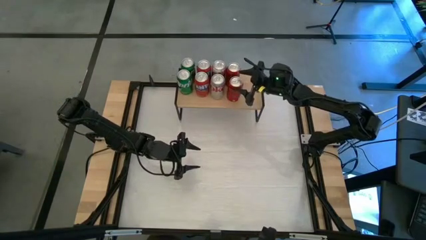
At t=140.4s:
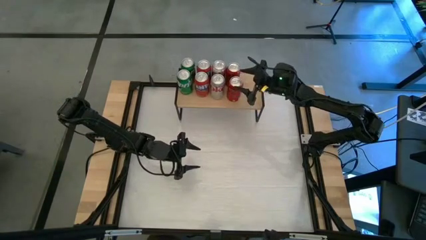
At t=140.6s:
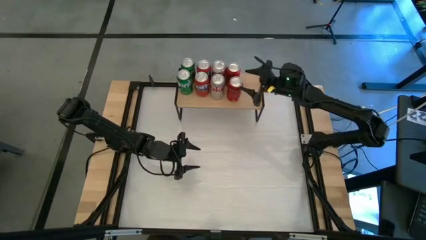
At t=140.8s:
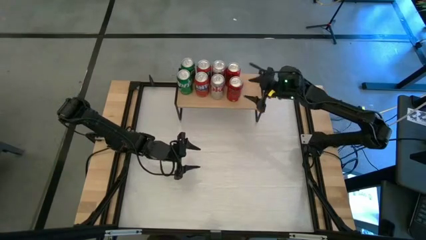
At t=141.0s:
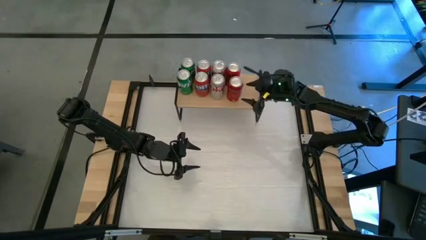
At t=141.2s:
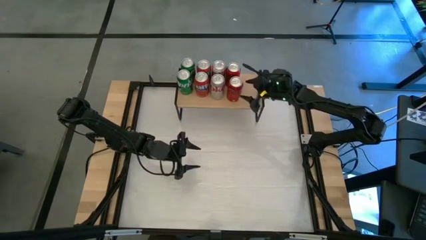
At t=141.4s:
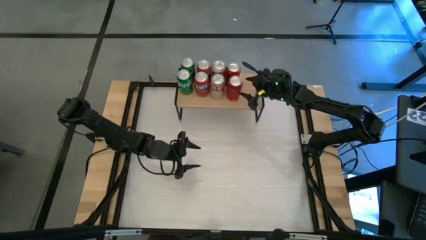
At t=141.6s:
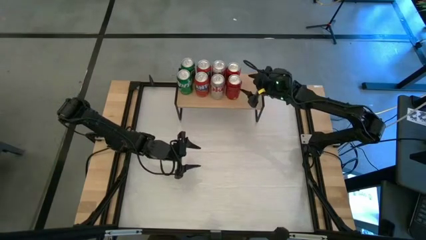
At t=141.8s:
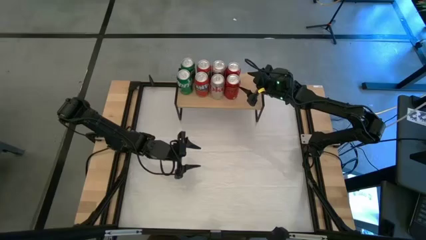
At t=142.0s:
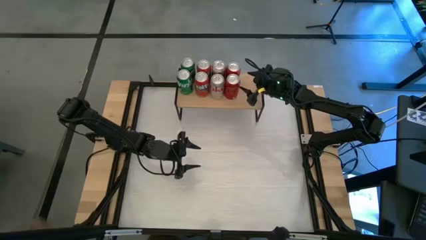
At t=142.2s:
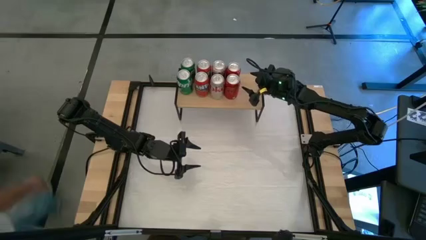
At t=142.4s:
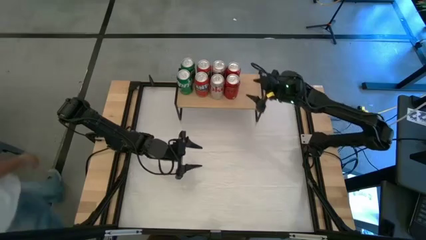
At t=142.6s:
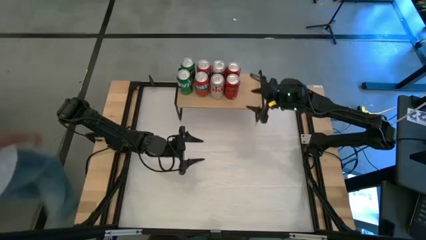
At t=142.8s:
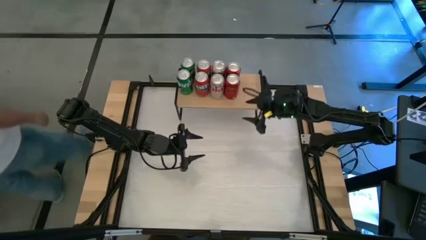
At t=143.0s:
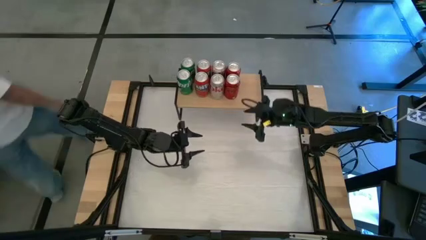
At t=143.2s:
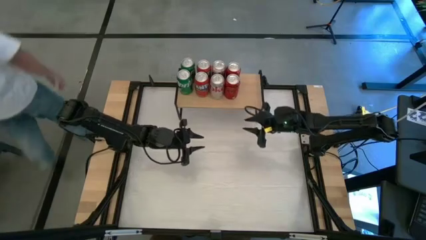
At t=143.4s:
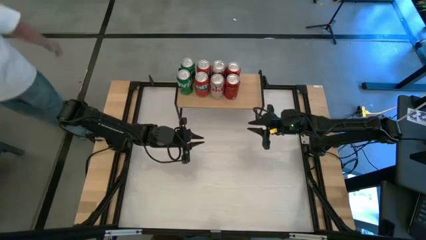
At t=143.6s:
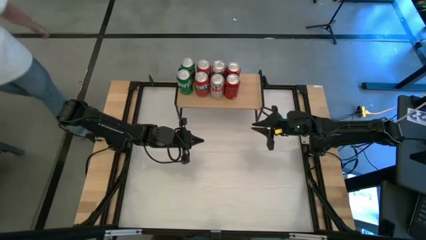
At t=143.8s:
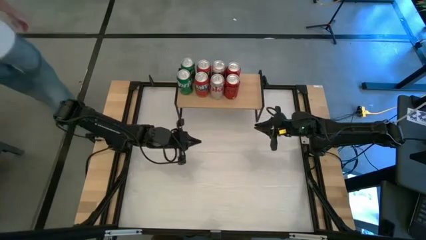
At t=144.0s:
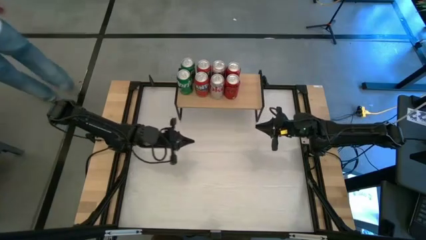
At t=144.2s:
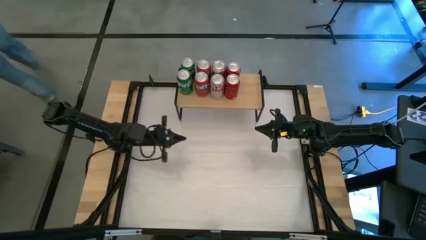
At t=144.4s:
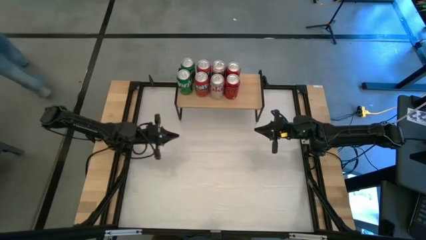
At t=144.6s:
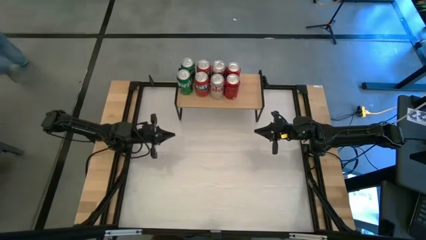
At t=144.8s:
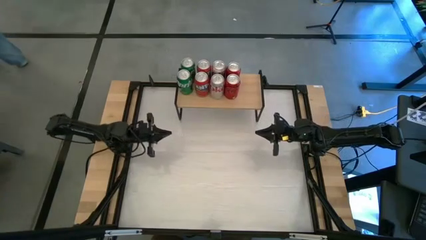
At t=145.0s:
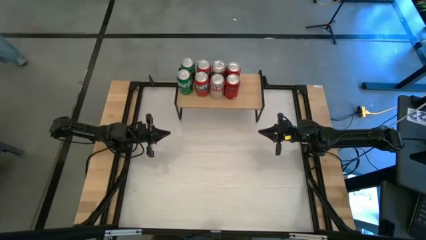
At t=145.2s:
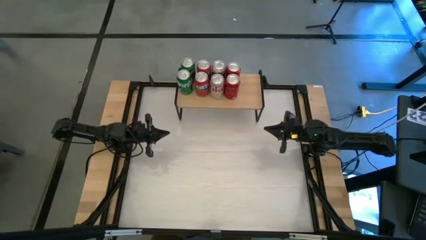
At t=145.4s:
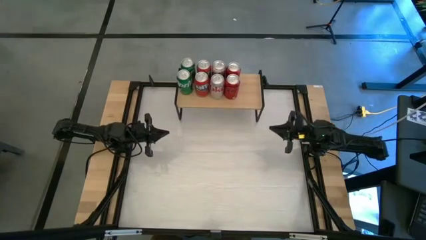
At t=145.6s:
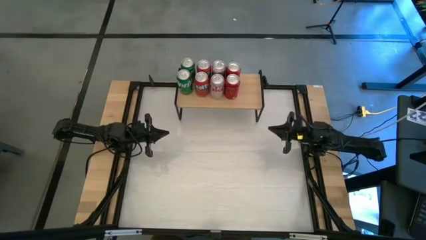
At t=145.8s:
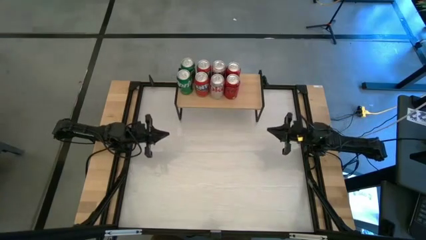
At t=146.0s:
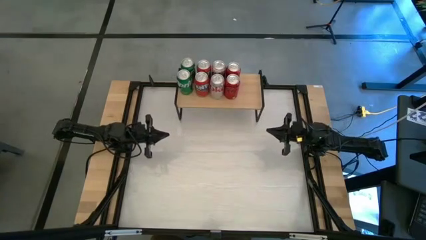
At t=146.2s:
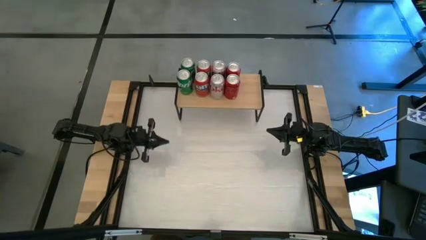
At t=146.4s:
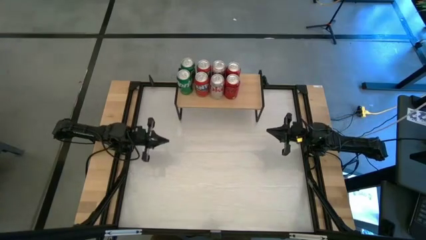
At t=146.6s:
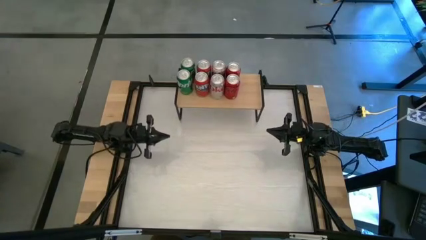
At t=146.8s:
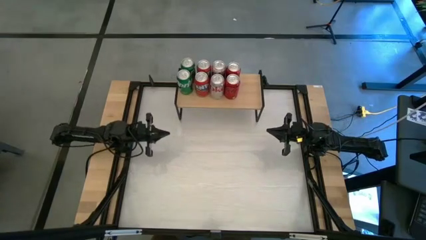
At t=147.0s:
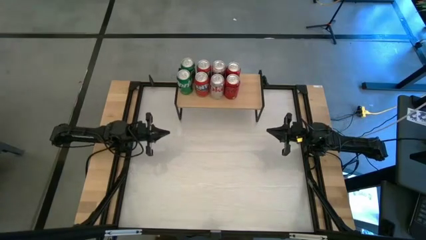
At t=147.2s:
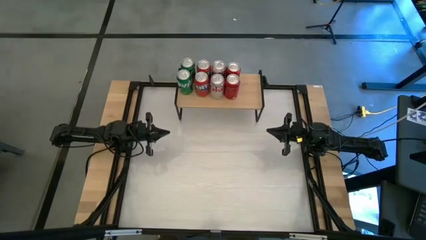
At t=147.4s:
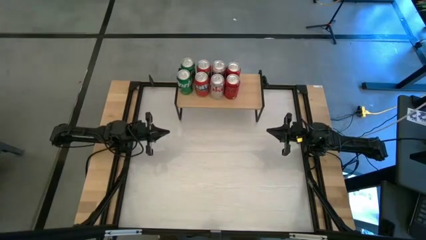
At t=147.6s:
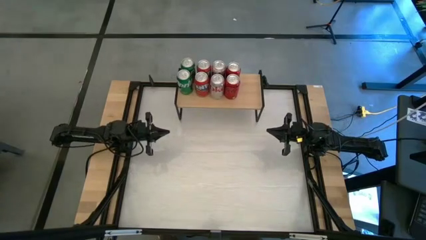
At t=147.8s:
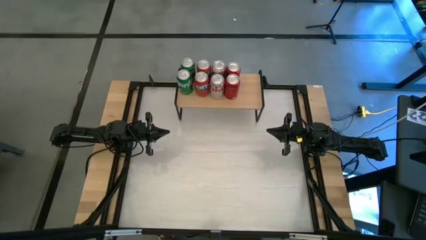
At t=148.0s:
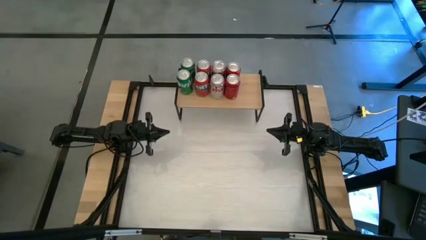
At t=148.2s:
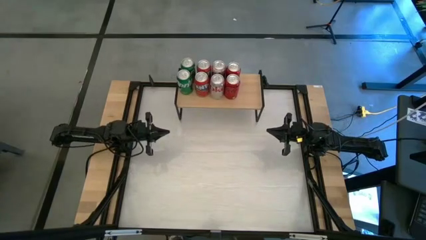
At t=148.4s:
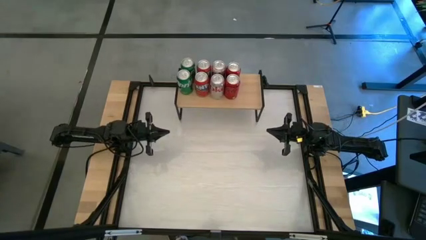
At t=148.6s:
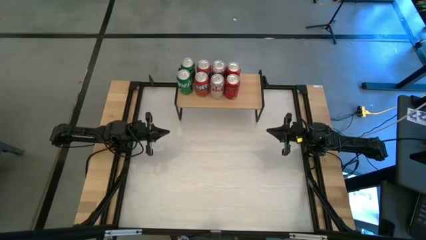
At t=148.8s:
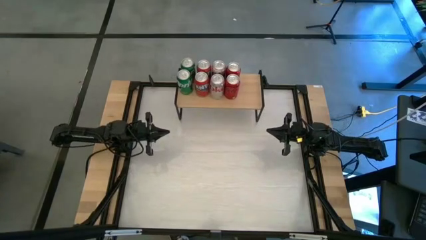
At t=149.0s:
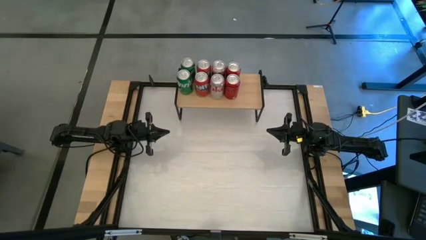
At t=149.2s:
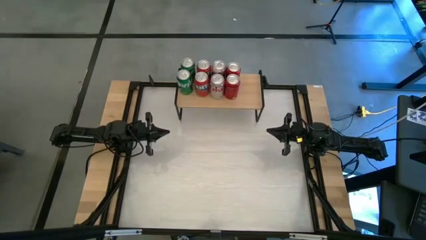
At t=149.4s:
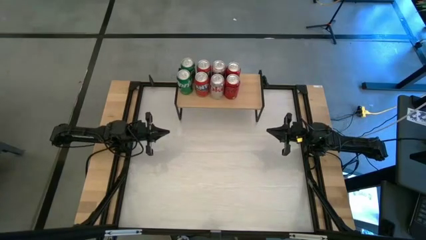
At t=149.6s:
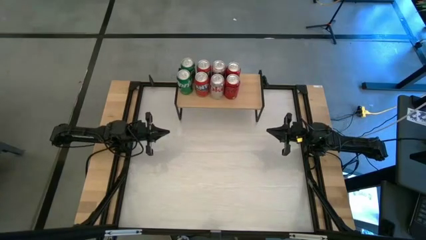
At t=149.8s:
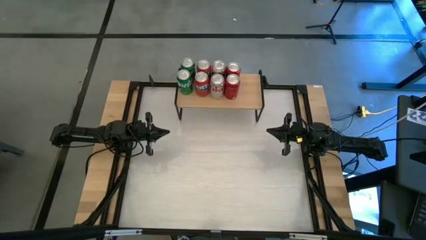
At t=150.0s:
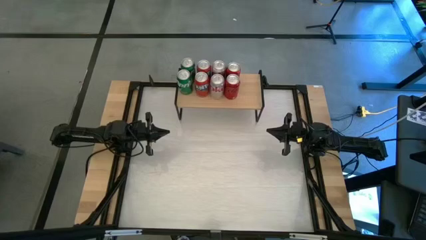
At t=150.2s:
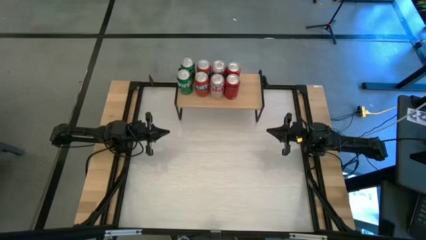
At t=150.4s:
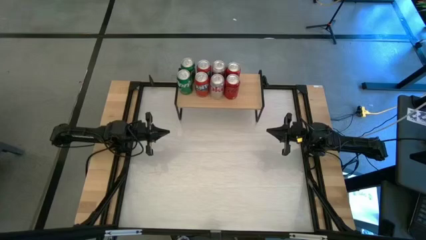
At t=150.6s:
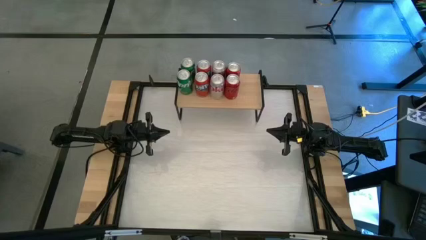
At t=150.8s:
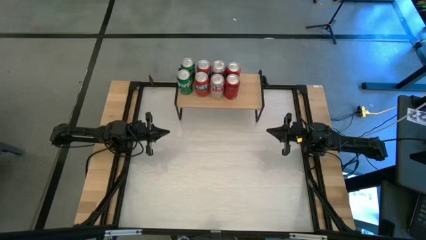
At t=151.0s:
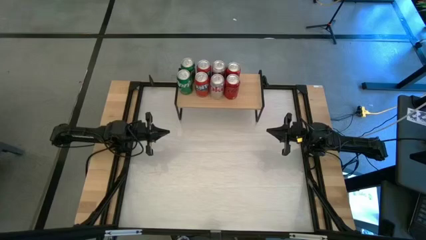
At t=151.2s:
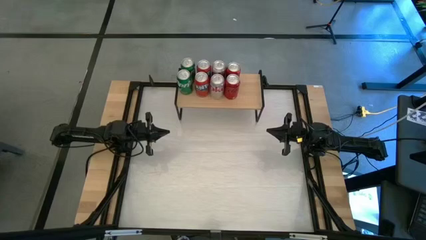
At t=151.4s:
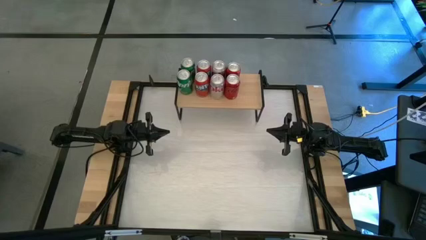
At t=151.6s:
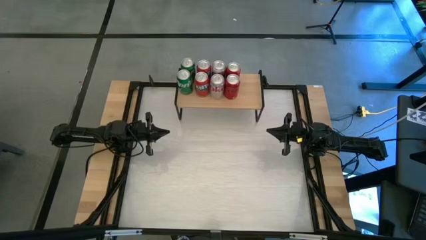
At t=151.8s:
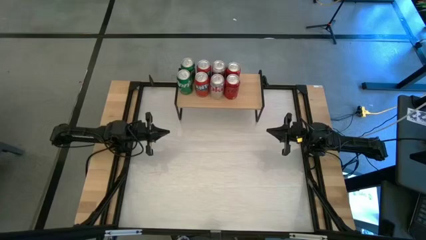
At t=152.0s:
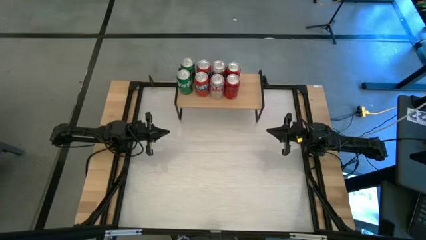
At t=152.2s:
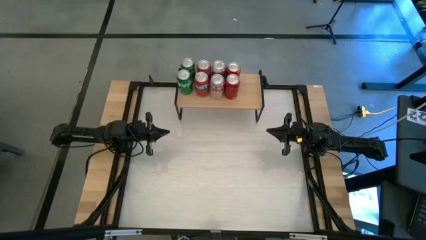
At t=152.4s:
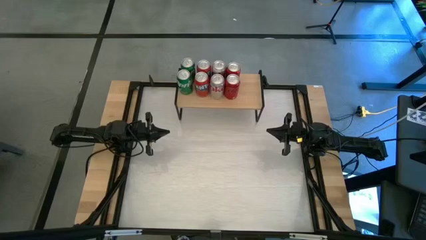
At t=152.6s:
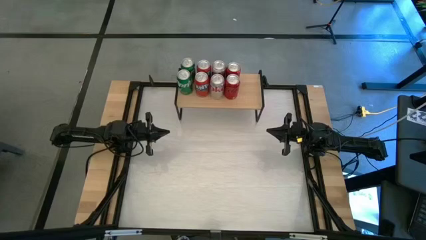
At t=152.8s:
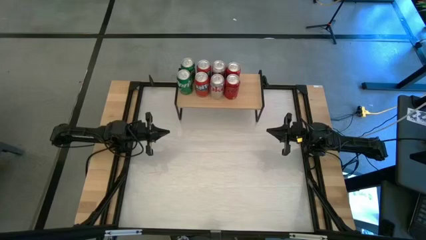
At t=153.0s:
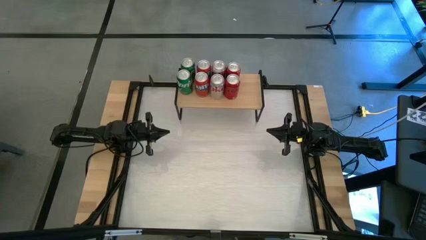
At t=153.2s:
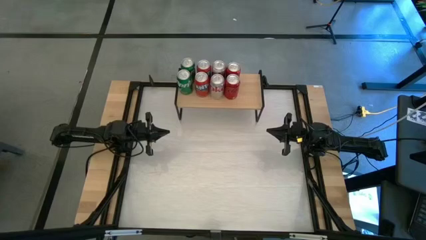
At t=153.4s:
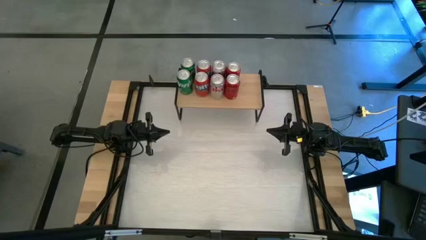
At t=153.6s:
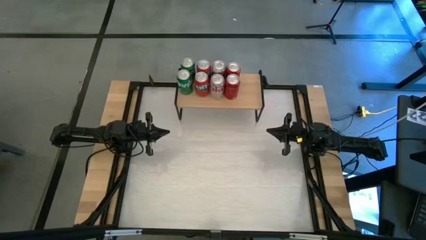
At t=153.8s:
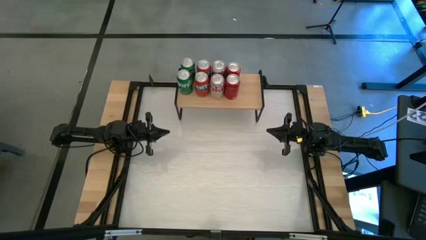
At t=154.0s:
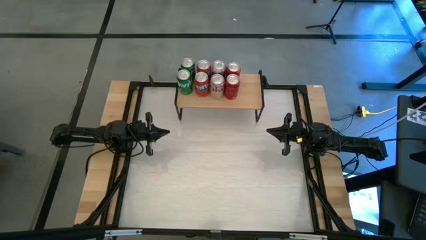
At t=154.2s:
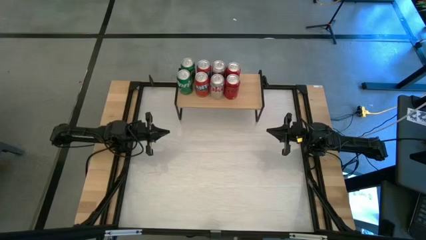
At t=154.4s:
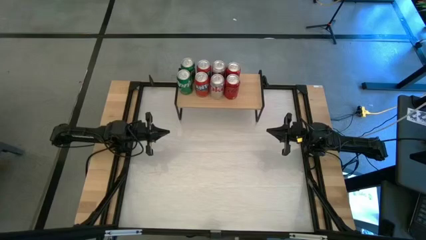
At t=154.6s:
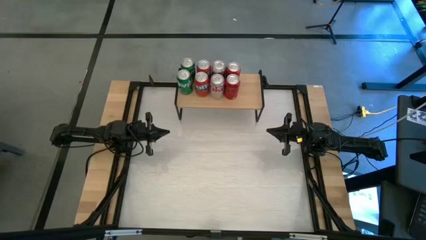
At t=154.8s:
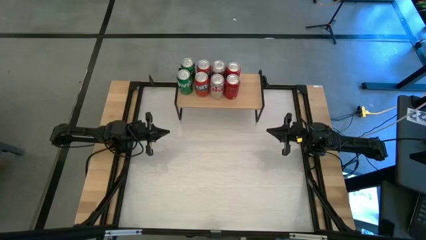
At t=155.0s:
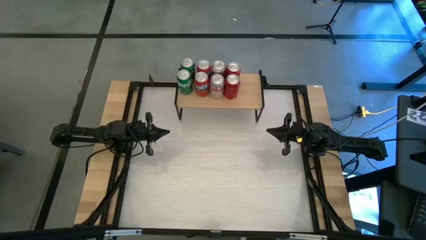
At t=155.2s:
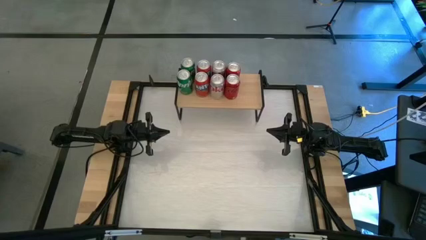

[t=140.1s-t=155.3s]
Task: Place canned beverage on shelf
Return to Home Position
